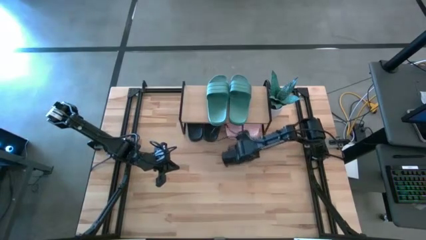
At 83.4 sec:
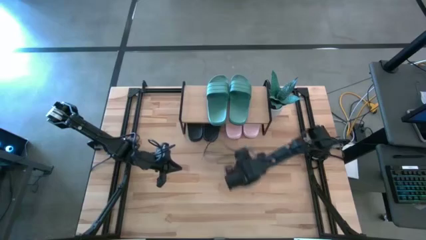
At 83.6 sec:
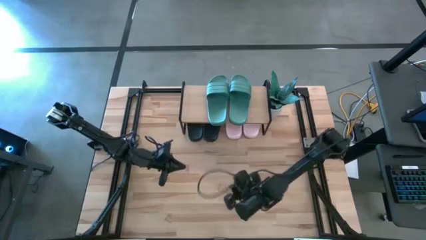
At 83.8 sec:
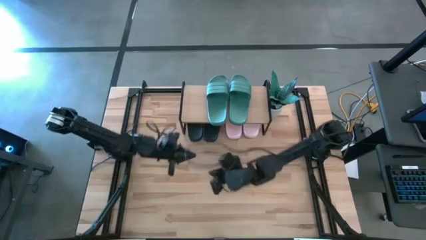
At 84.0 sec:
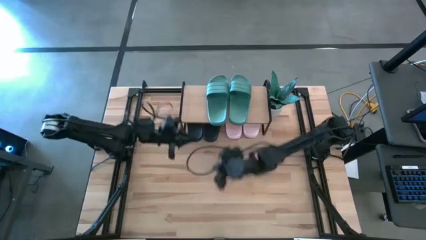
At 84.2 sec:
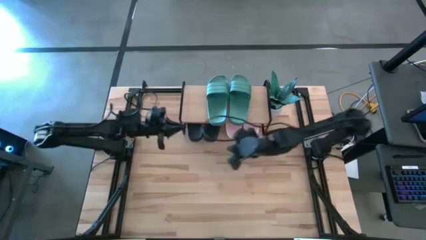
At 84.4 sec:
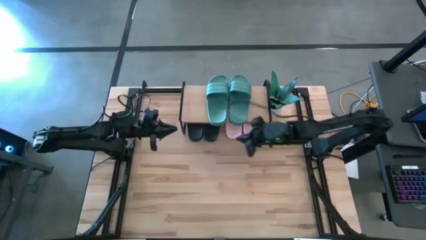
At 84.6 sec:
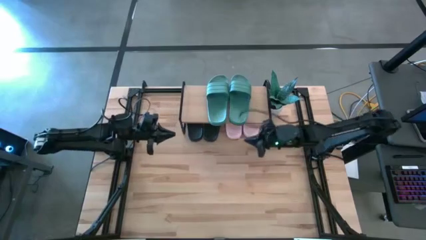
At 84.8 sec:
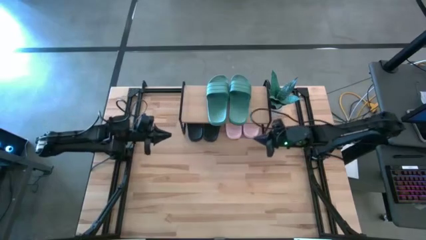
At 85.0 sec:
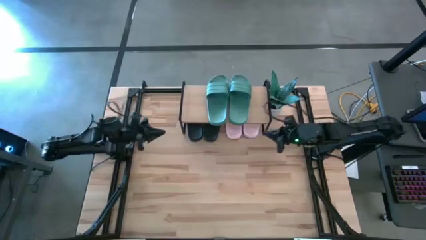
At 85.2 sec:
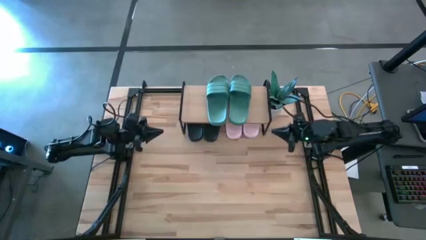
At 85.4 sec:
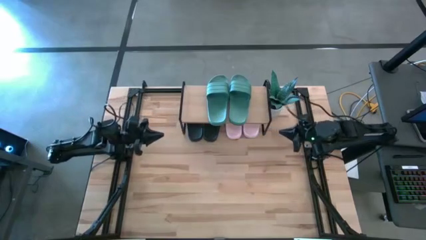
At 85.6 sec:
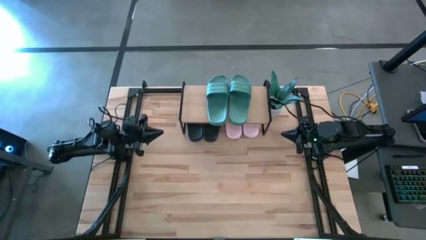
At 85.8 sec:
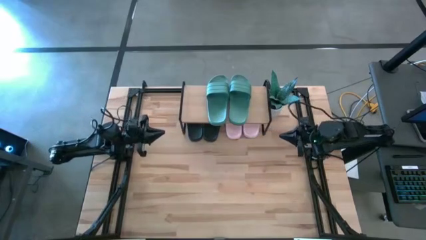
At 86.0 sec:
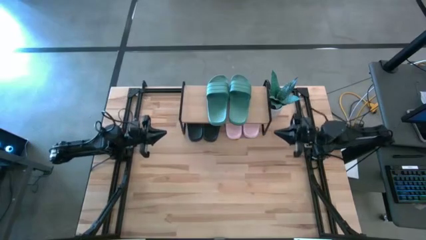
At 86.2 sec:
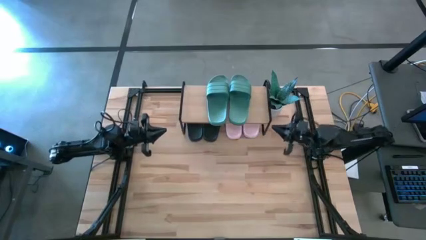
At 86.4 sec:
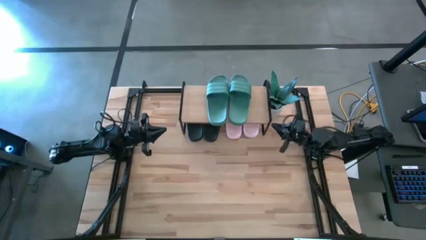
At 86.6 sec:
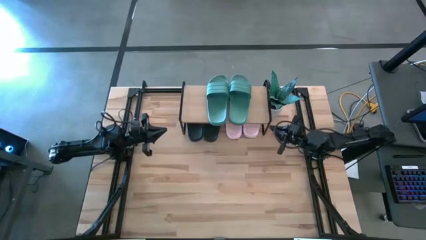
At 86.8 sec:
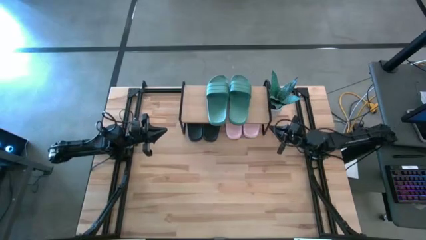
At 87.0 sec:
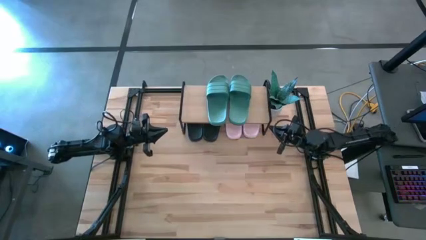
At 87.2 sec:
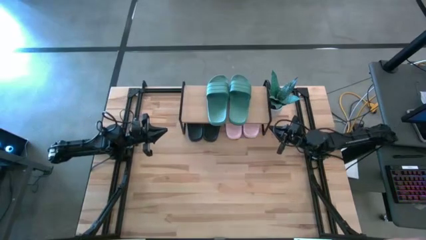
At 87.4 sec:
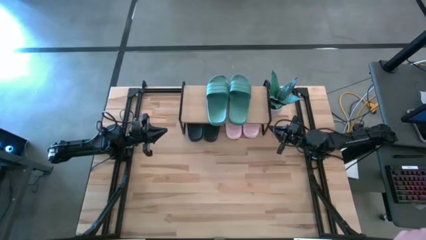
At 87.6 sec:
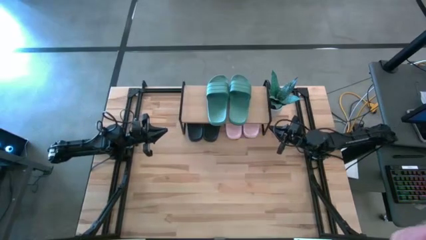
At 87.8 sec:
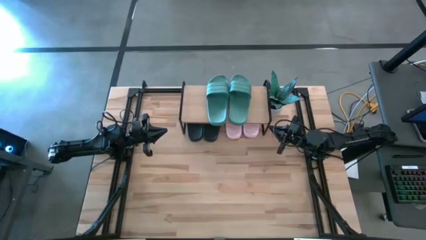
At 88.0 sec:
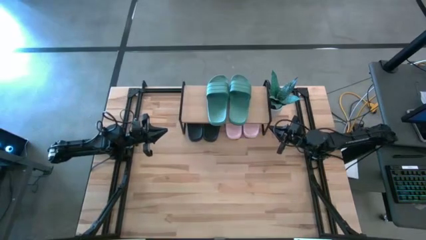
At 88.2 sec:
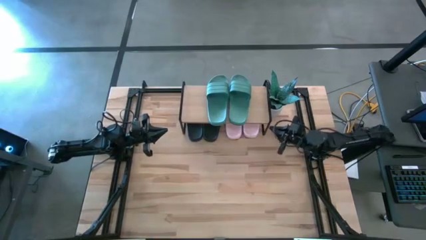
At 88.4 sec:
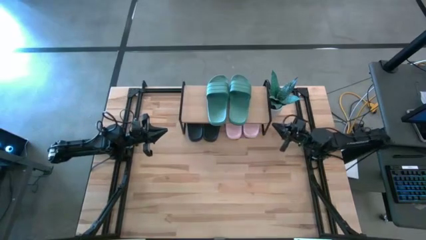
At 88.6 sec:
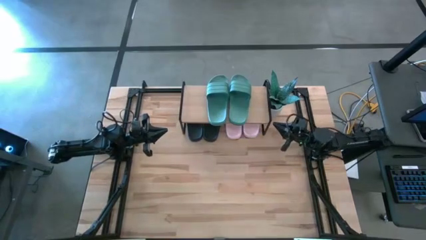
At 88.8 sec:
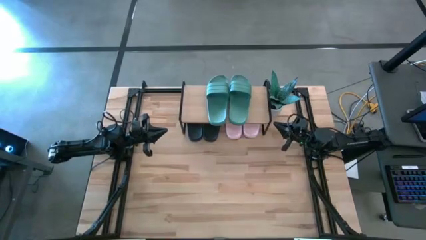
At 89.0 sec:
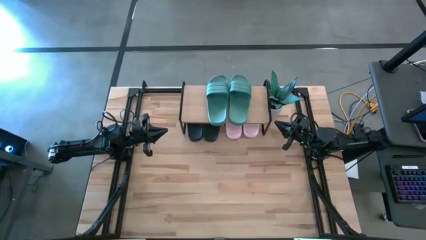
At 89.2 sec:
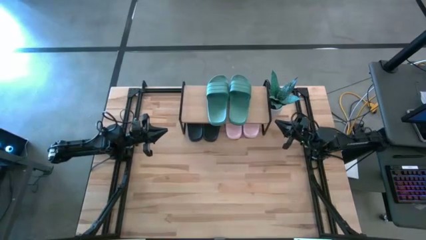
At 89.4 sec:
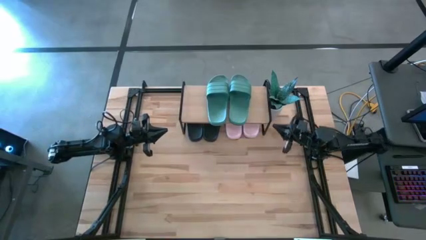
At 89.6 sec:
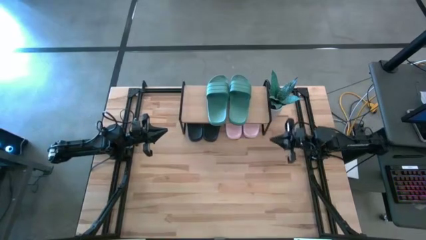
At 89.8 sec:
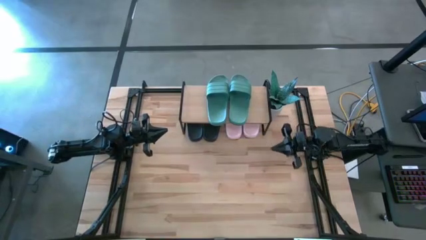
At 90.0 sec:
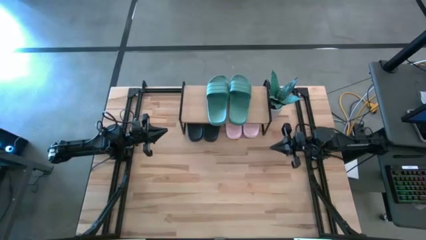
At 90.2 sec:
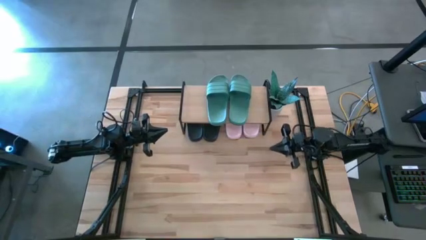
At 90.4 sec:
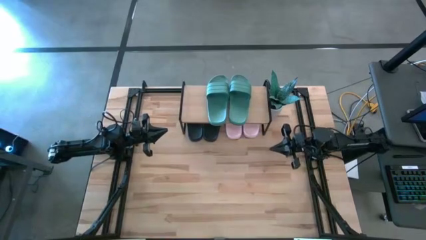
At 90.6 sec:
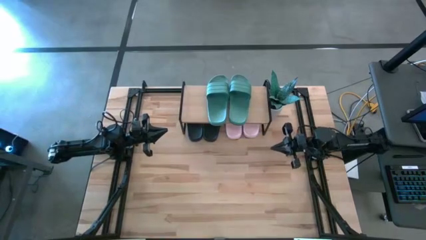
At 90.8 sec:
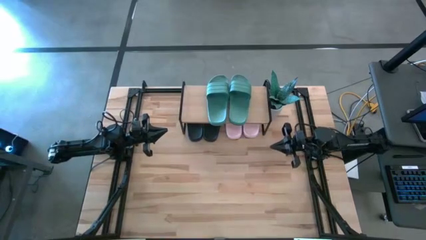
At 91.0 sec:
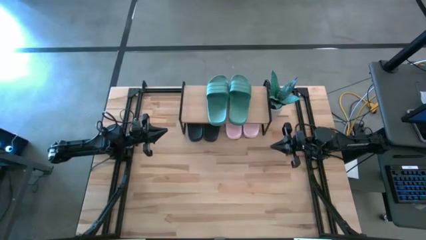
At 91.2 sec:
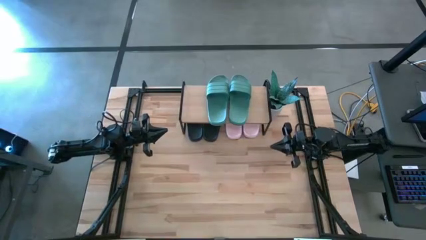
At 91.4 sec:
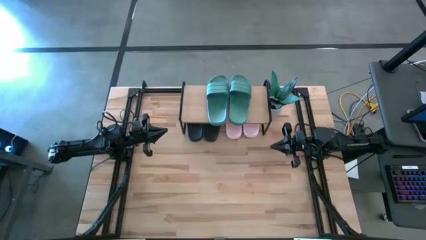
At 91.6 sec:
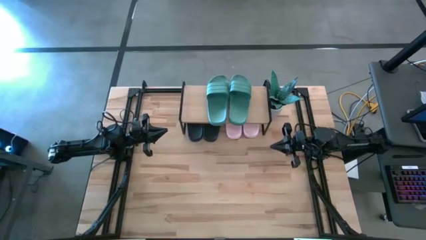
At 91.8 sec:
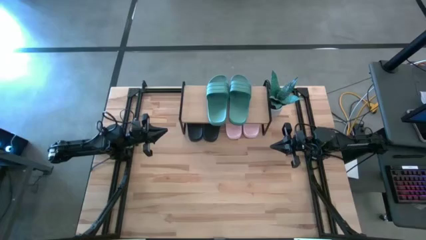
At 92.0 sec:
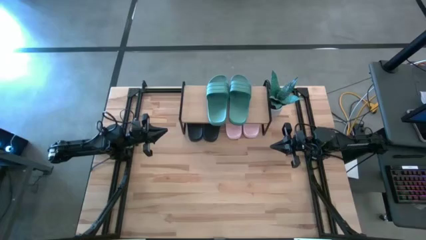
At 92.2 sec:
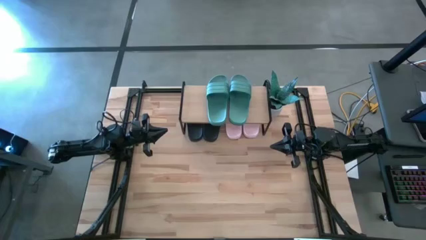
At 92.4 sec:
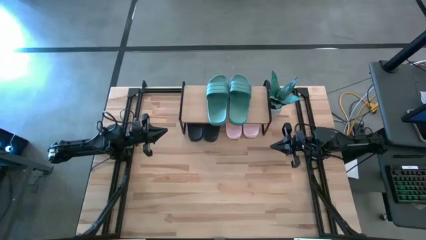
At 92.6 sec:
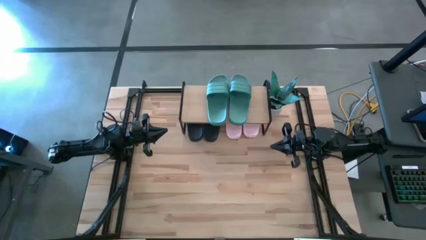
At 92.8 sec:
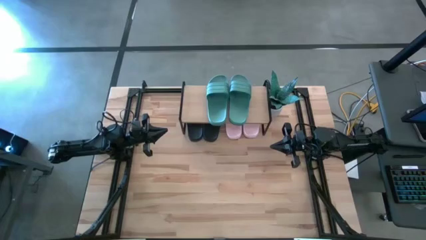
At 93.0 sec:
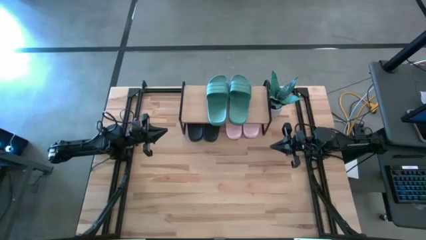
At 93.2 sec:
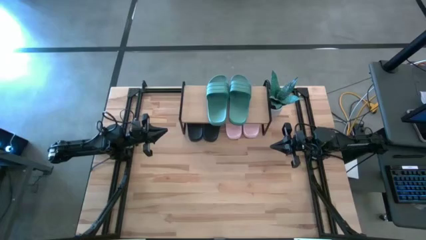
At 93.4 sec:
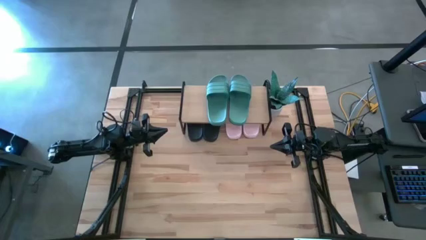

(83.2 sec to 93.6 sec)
Task: Pick and place slides into the shelf
Return to Home Position

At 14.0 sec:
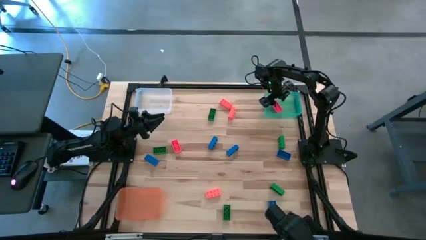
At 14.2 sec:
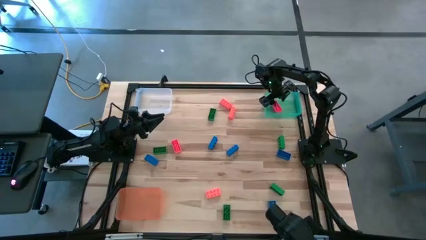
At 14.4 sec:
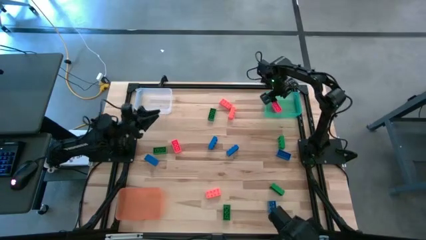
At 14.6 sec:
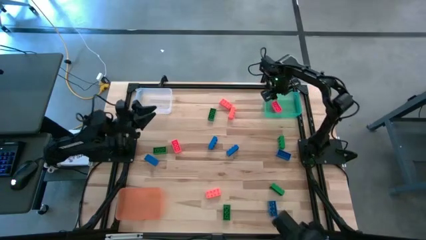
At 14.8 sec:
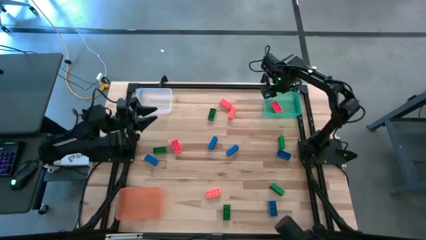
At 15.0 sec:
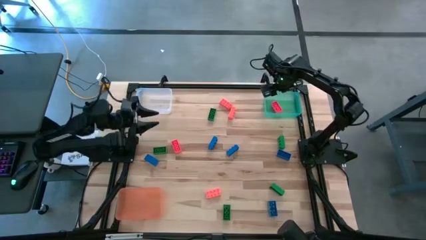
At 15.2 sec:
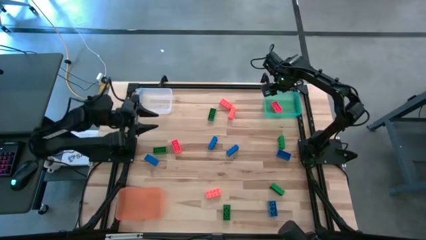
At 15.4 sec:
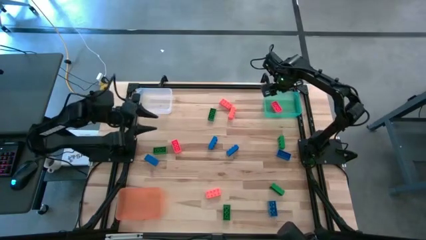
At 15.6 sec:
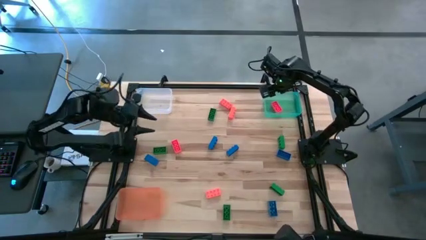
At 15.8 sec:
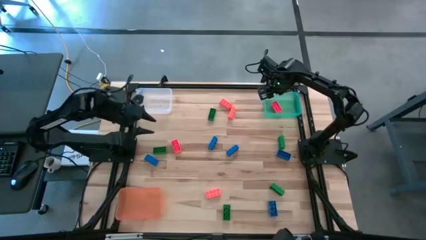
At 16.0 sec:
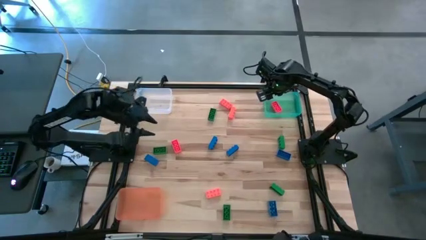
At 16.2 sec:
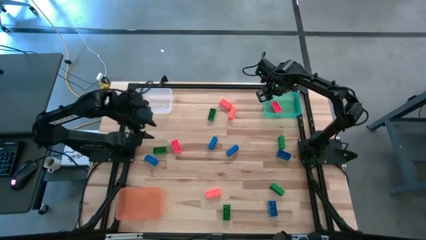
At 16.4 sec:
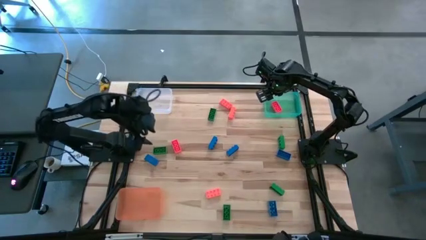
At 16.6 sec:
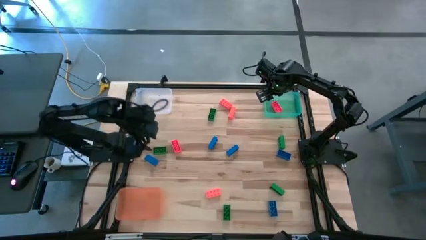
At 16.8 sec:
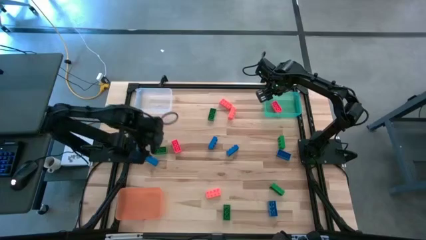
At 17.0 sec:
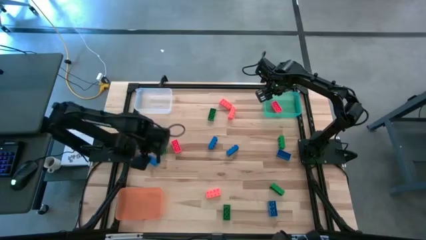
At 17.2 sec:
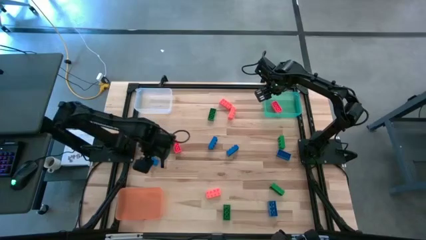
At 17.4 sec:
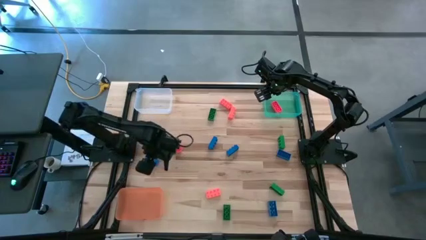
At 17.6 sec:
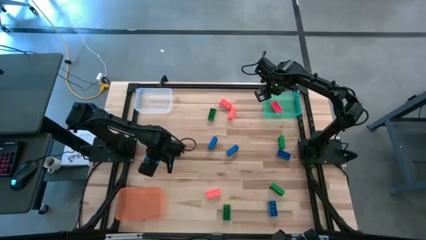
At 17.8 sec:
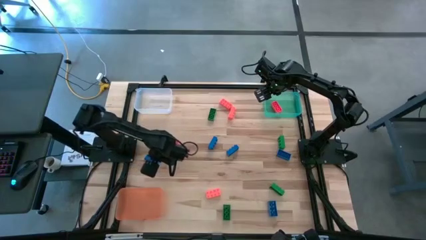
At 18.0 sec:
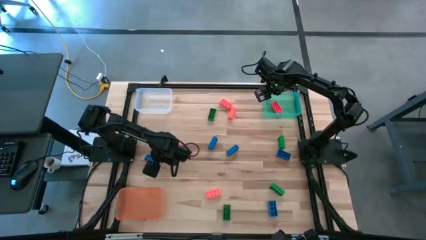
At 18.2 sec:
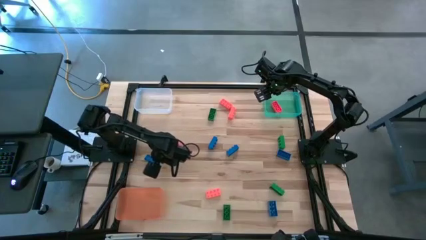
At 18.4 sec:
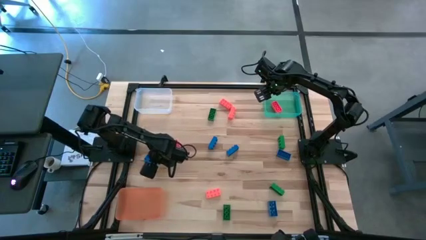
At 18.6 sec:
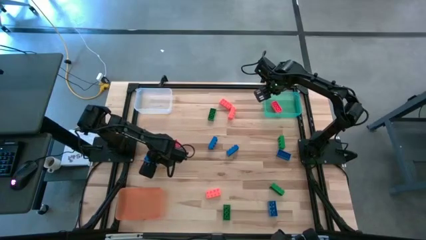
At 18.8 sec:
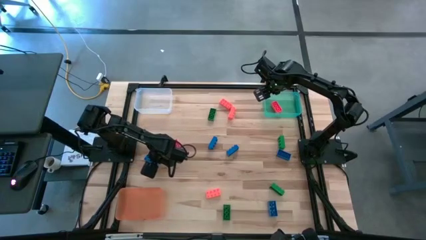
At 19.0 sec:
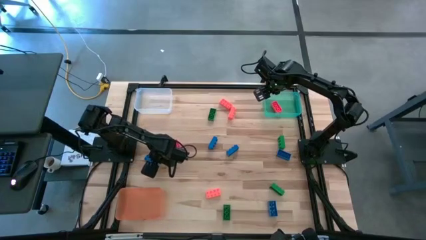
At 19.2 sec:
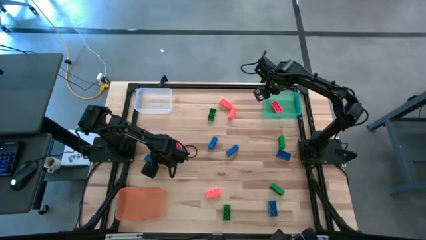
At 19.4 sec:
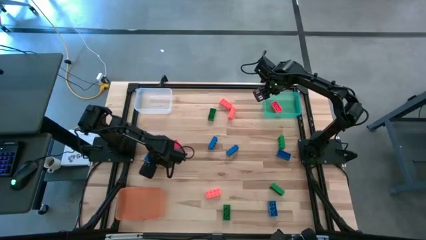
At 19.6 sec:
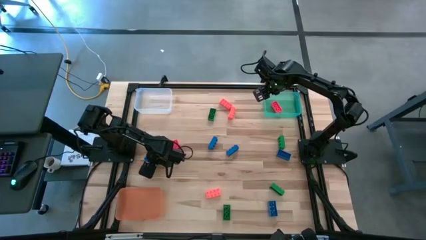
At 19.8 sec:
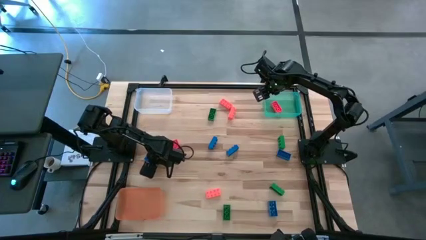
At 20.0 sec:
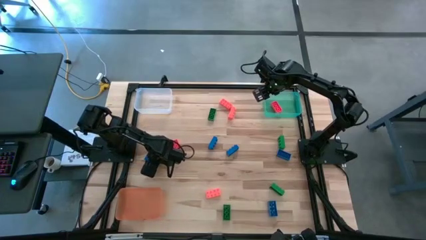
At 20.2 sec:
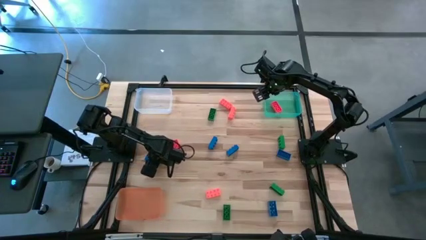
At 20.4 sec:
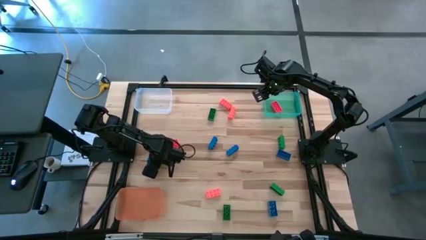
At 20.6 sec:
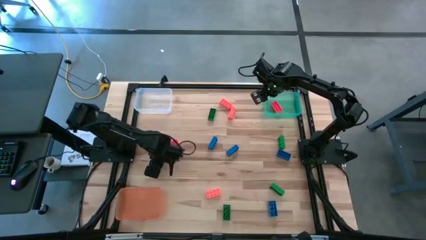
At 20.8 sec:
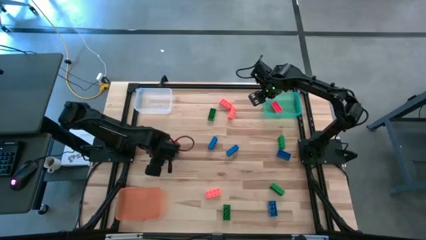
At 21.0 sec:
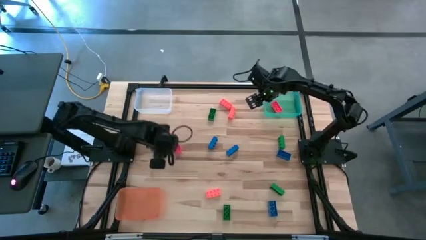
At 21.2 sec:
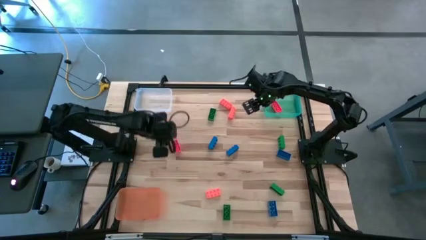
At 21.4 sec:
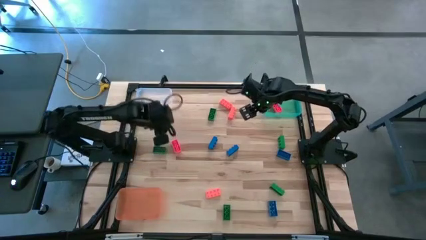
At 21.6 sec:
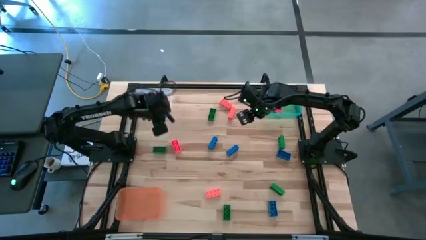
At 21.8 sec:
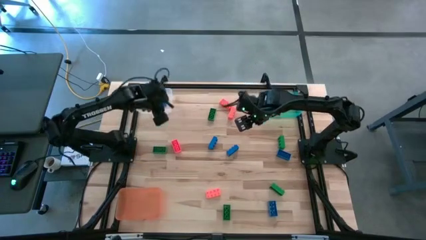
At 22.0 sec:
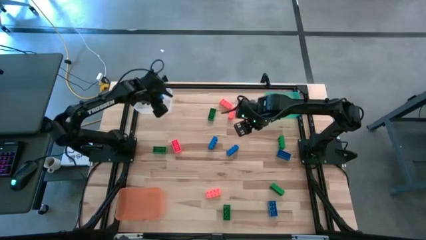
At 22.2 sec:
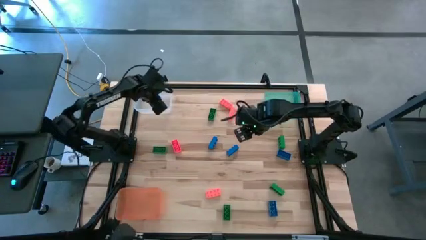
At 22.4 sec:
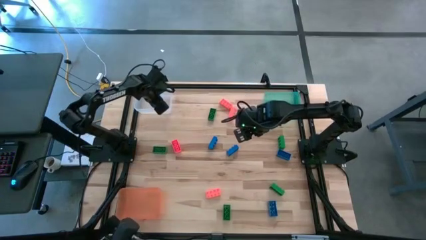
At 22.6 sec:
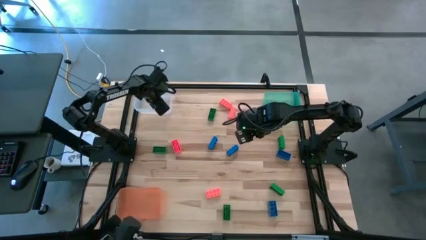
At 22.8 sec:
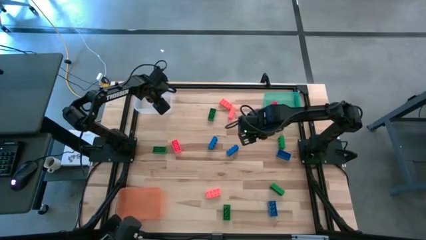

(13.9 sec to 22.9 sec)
Task: Sort & place blocks by color
Put the blue game piece into the transparent bin
